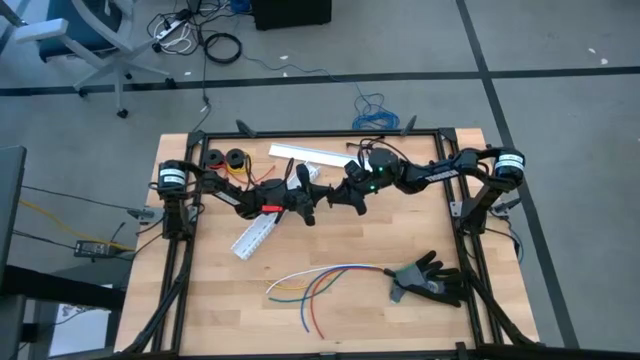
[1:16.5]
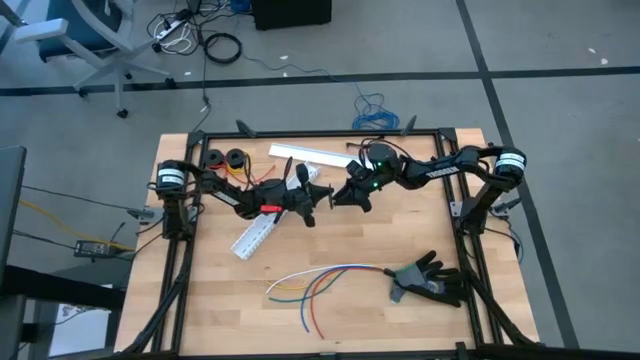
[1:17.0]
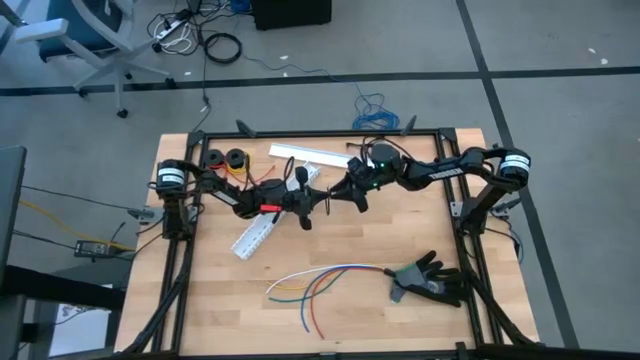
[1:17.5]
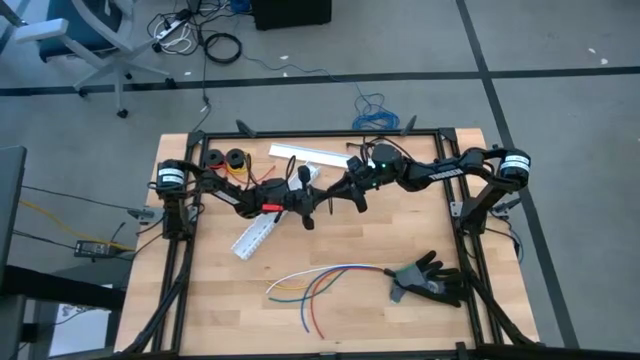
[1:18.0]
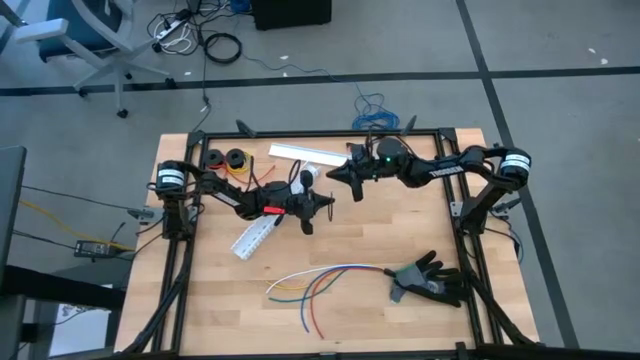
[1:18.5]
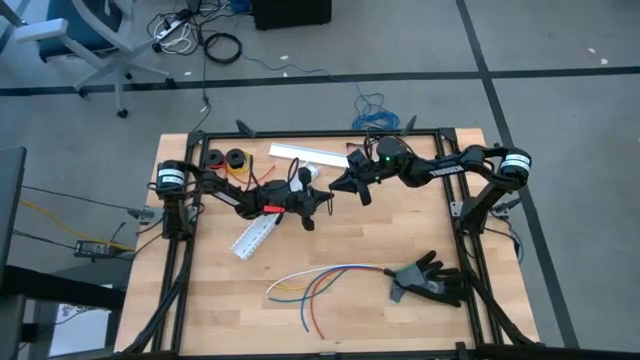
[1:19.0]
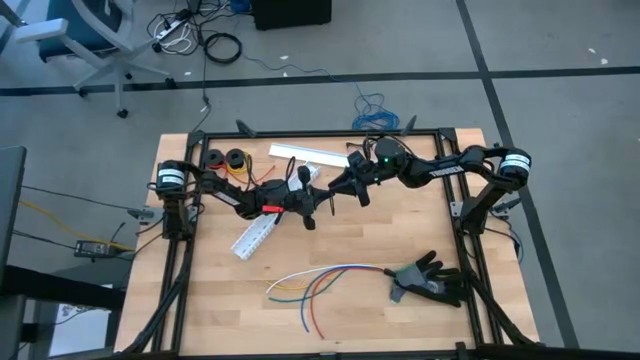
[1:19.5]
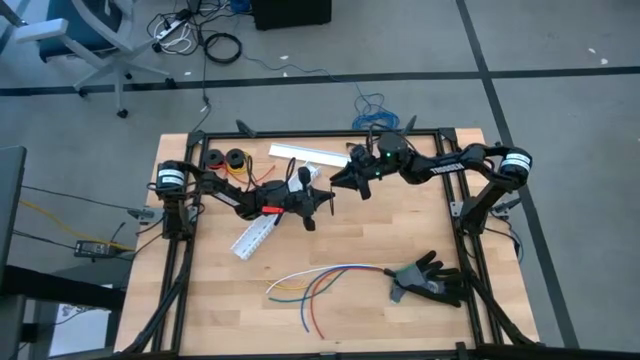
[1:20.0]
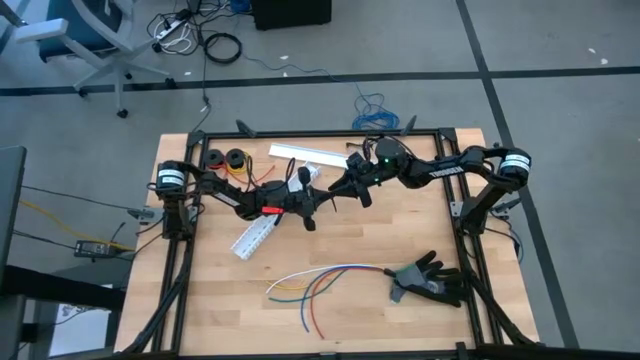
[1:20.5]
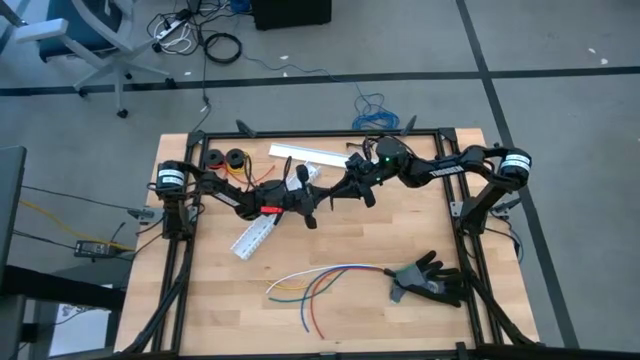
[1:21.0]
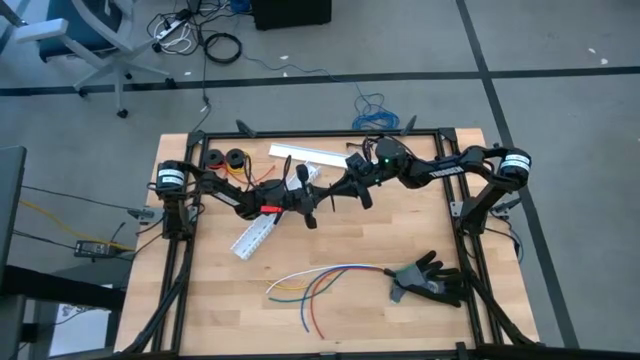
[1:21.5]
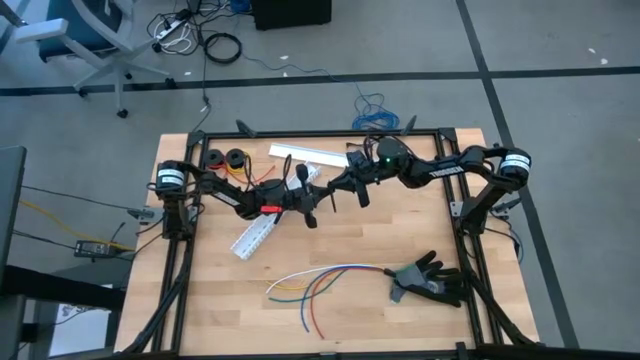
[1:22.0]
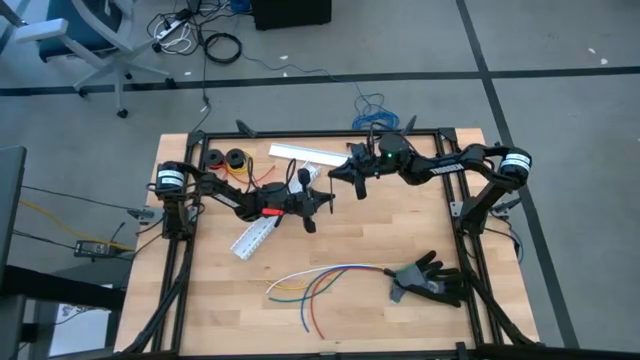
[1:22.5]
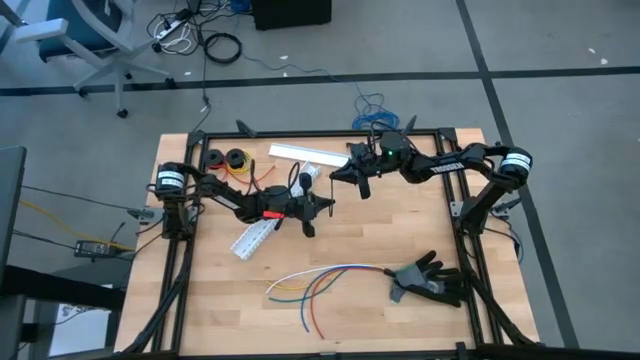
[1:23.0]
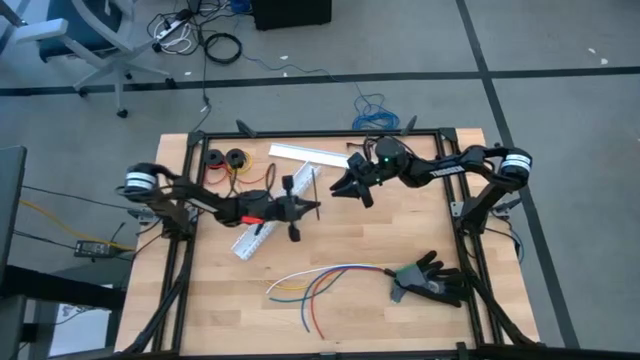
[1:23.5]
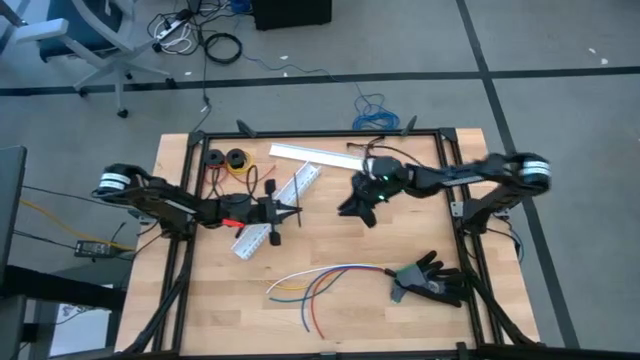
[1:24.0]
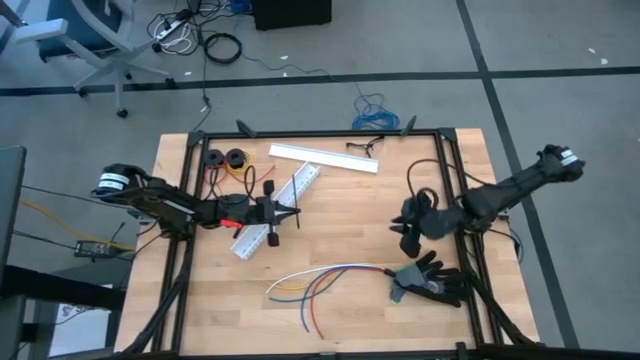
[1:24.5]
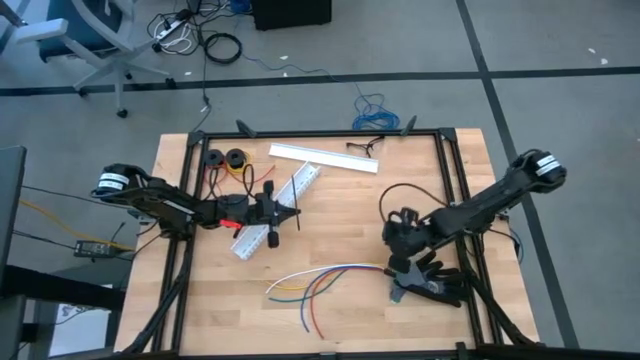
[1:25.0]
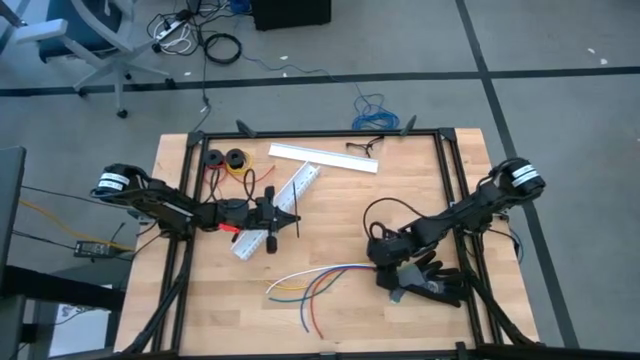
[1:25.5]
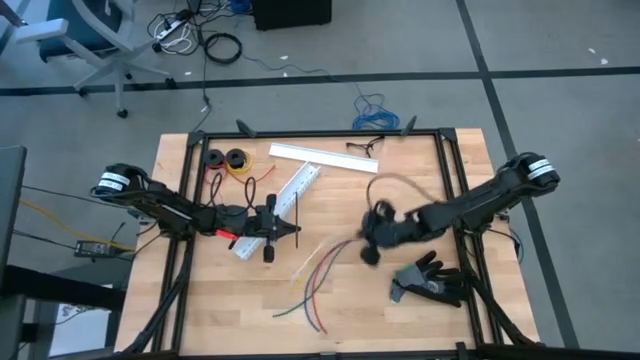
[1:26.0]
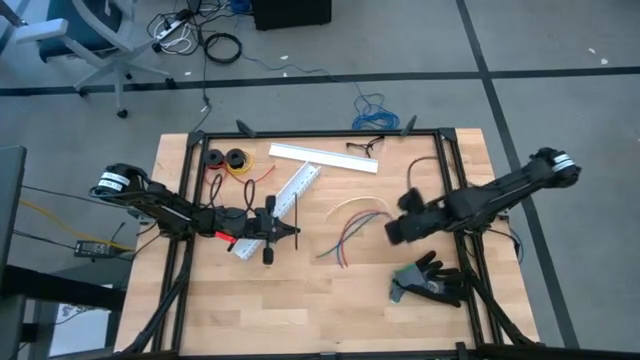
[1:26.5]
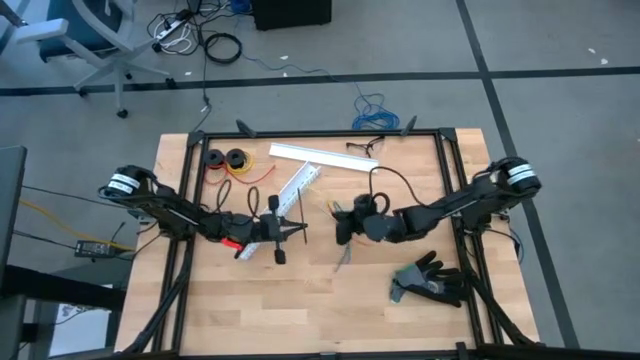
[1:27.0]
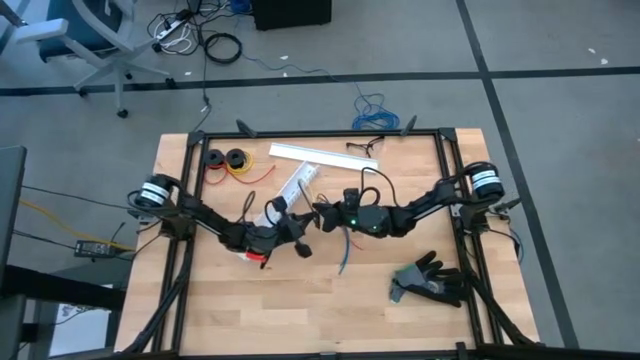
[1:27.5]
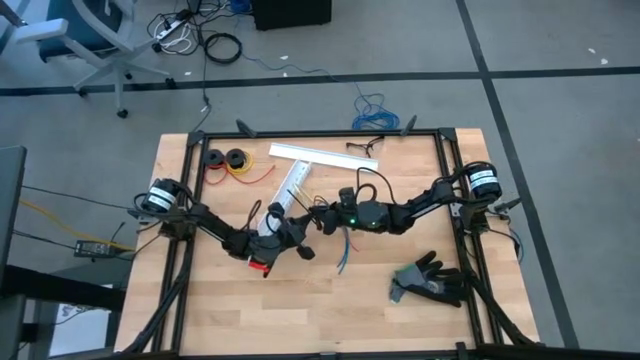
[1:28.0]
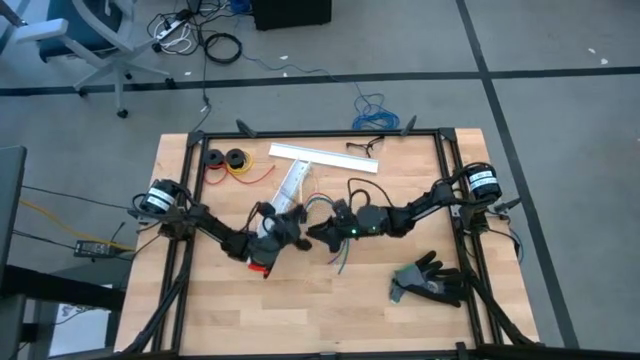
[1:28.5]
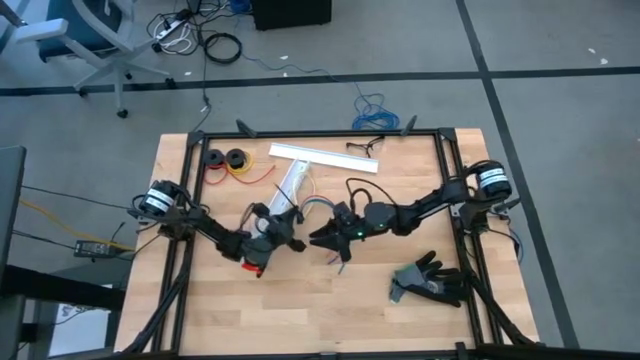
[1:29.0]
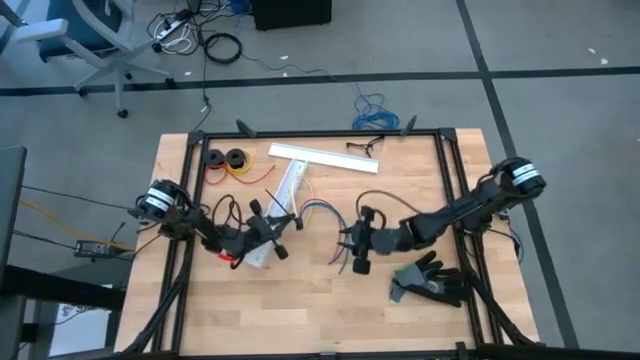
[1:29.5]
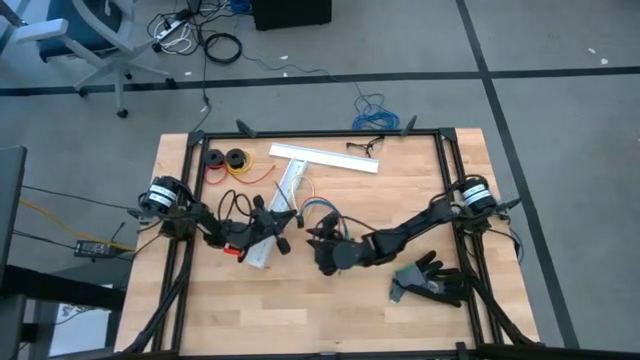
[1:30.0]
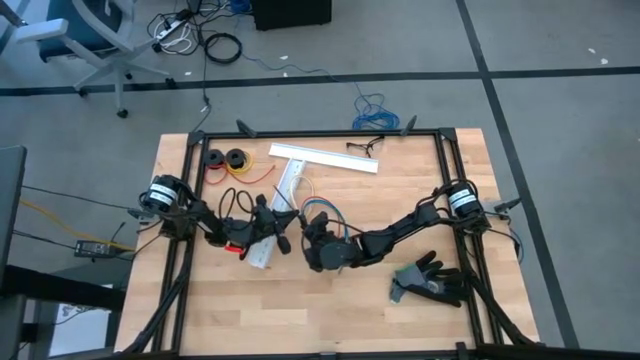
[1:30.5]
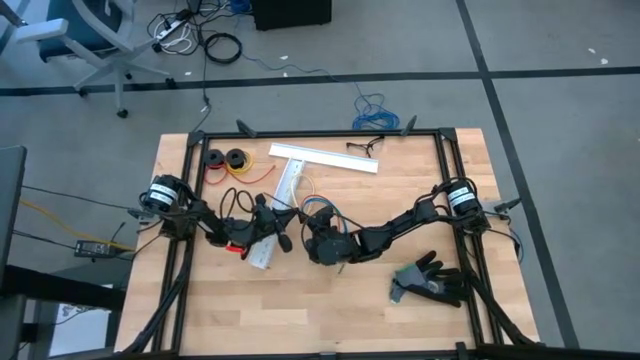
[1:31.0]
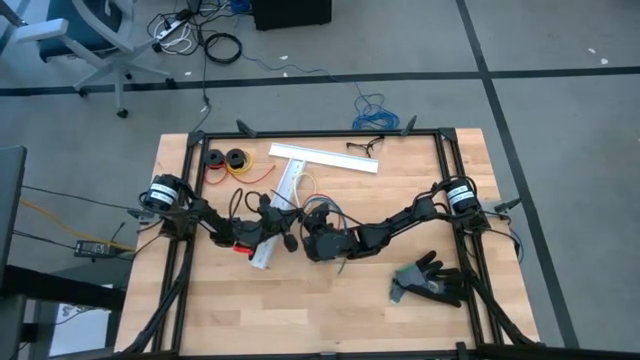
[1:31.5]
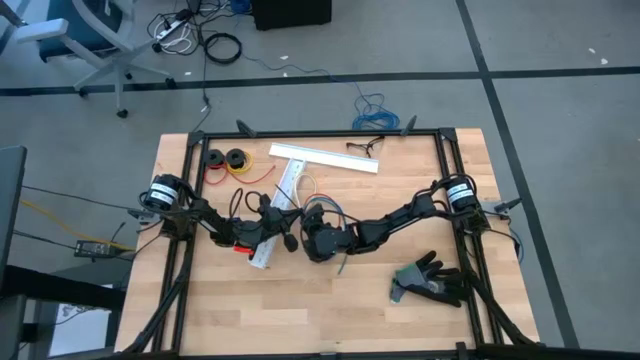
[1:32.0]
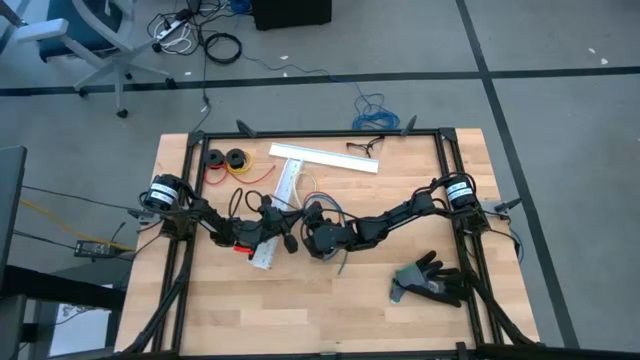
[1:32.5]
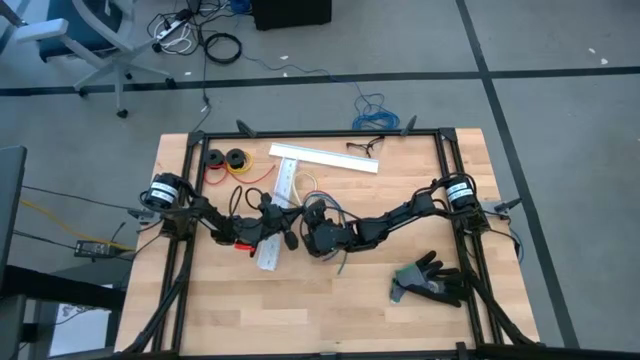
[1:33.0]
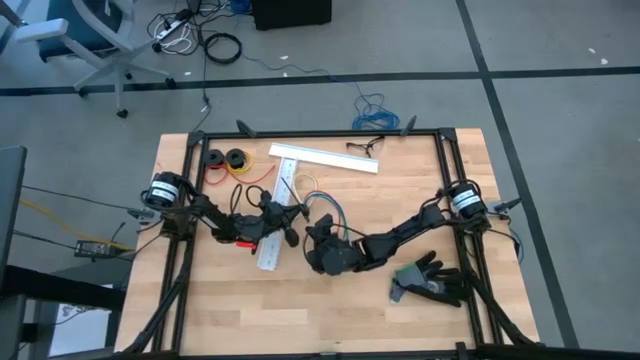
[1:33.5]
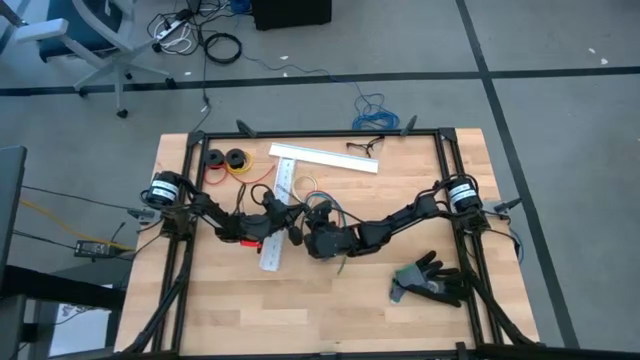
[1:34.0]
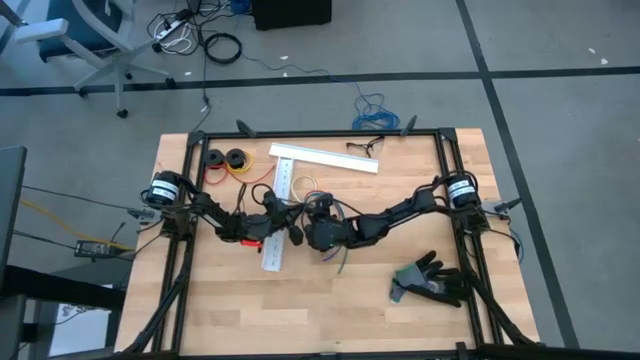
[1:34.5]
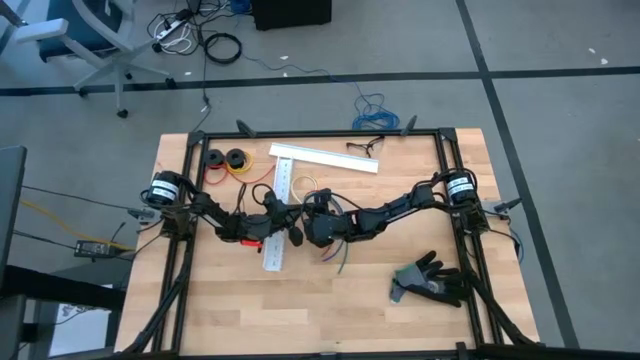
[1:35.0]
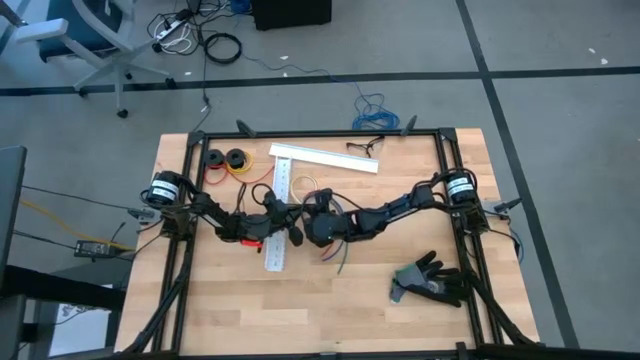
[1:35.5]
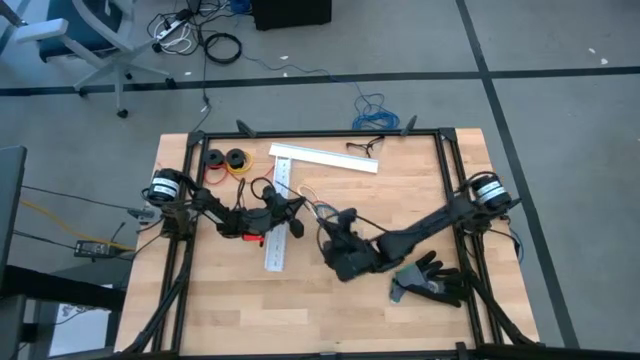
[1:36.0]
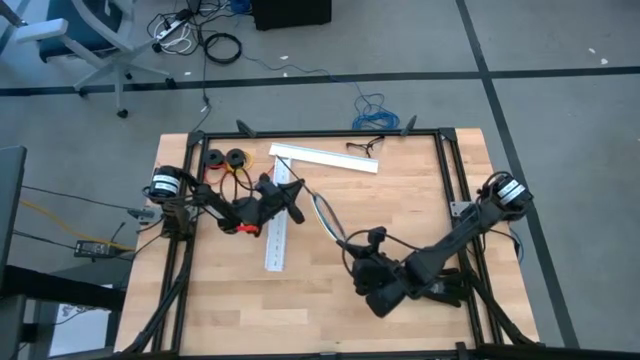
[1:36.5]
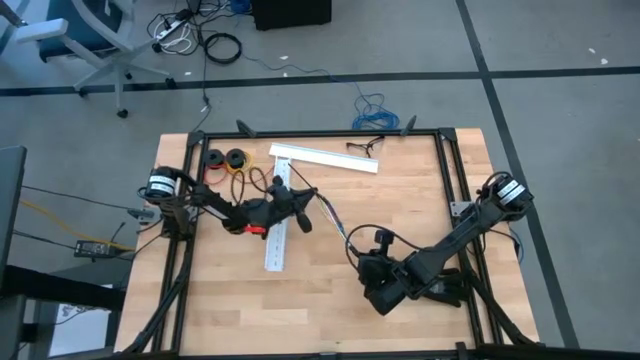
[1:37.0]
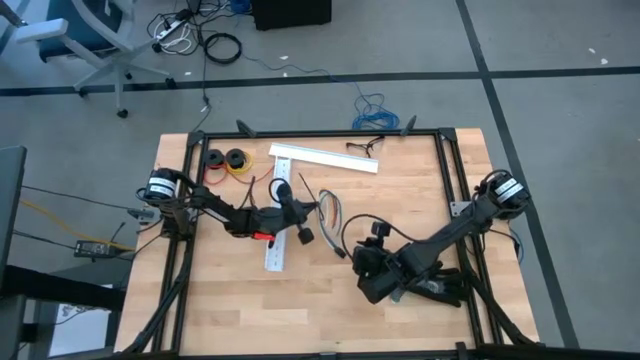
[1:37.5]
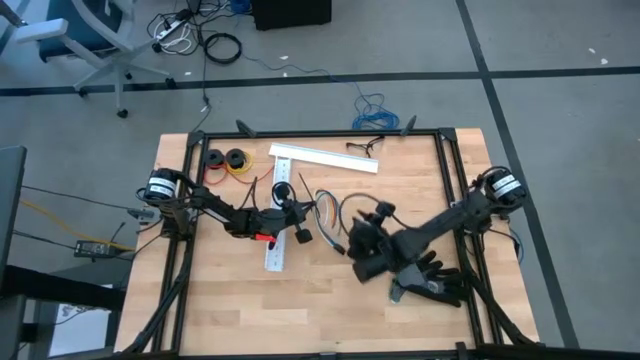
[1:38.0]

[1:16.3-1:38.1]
Task: Ziptie cables
Wrap the black zip tie on the cables
